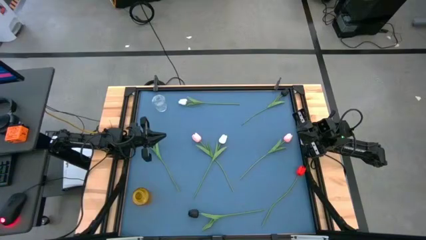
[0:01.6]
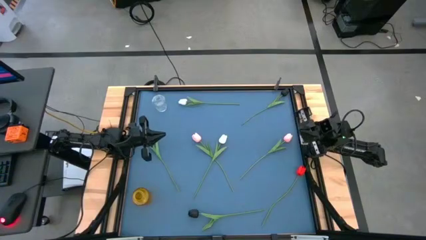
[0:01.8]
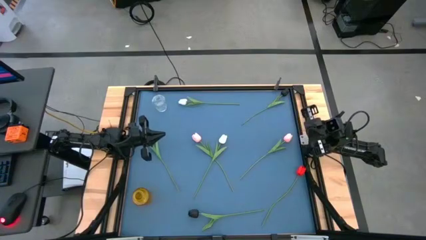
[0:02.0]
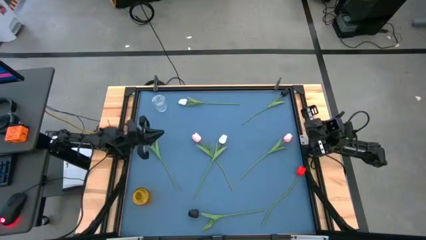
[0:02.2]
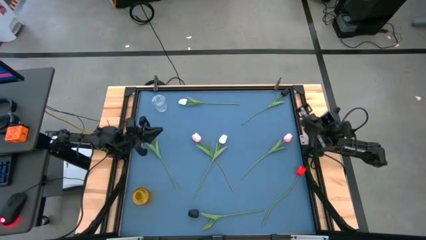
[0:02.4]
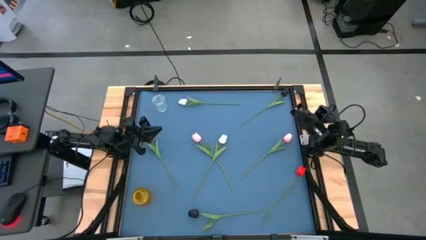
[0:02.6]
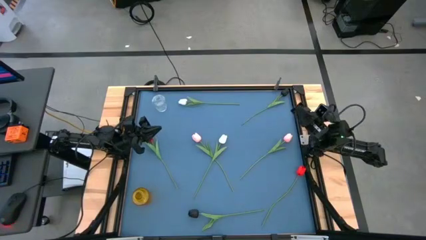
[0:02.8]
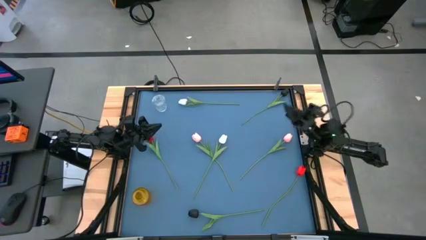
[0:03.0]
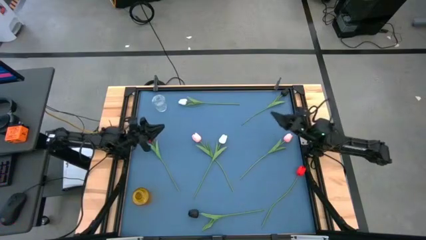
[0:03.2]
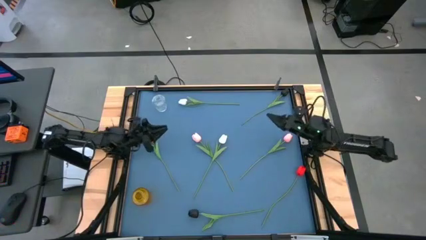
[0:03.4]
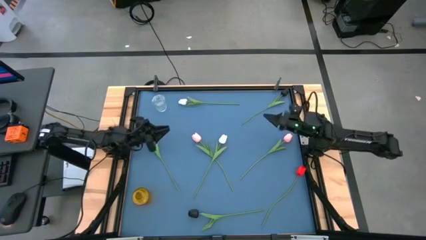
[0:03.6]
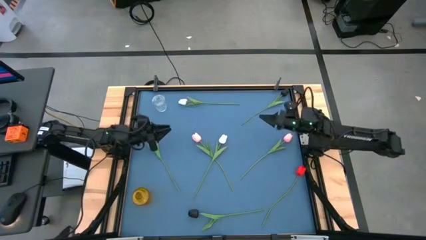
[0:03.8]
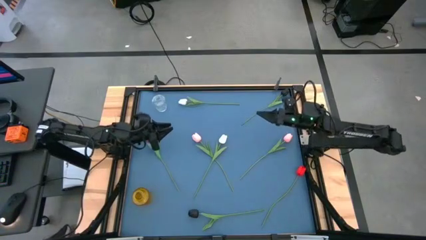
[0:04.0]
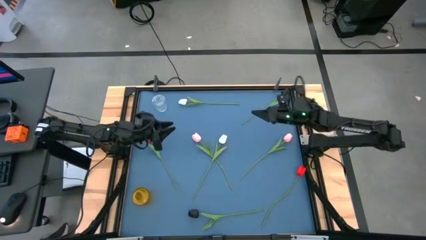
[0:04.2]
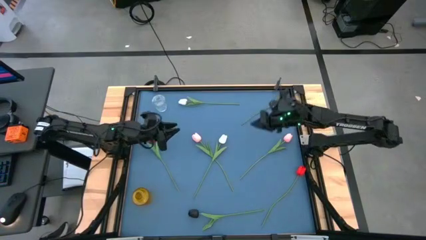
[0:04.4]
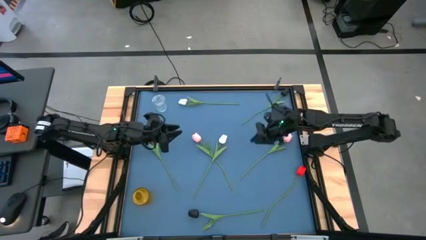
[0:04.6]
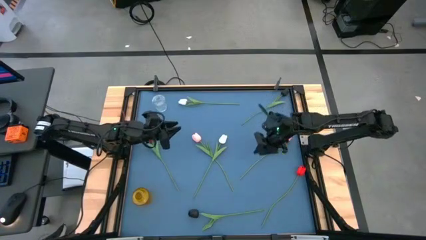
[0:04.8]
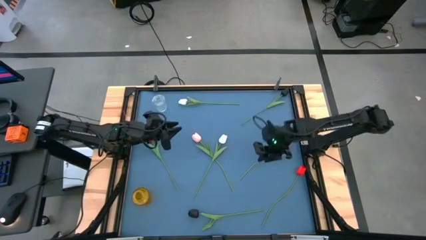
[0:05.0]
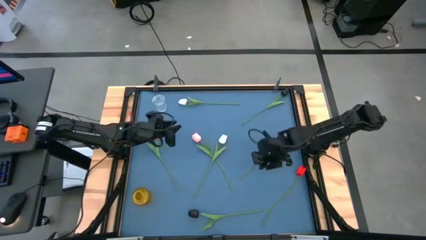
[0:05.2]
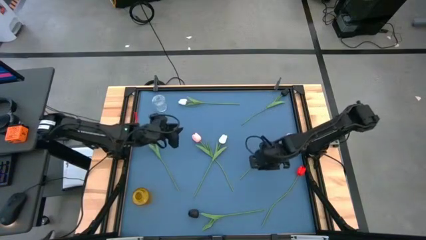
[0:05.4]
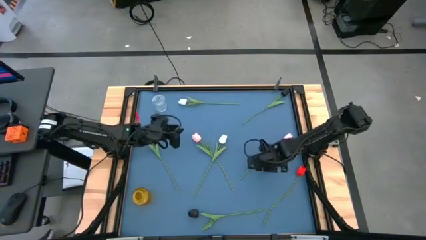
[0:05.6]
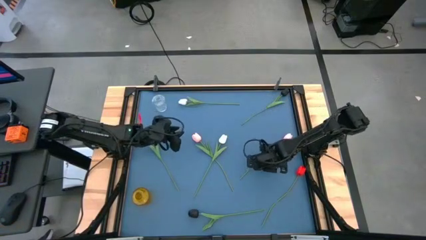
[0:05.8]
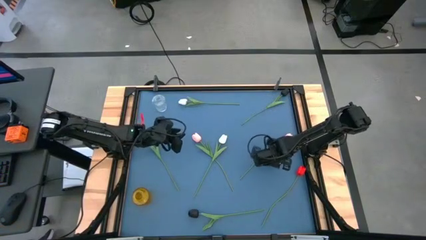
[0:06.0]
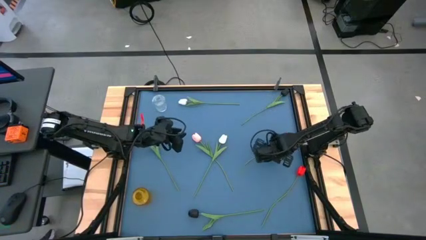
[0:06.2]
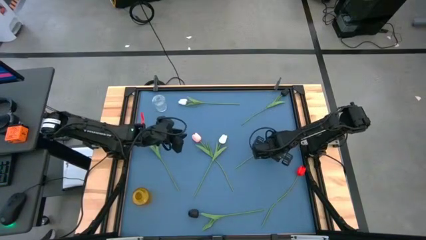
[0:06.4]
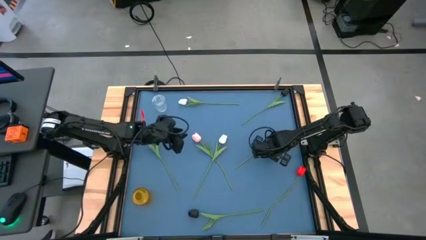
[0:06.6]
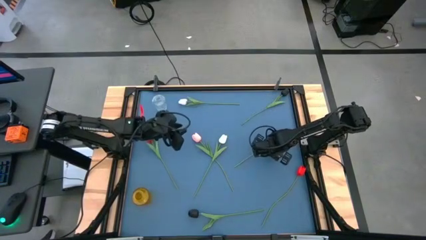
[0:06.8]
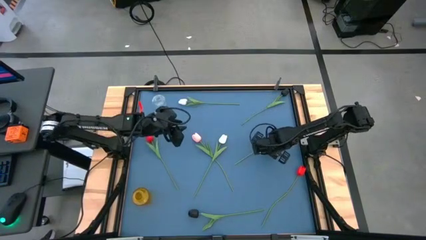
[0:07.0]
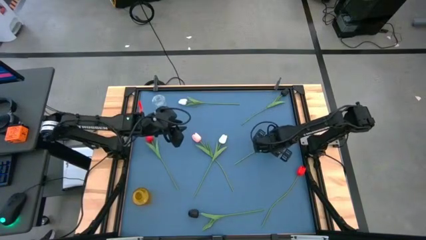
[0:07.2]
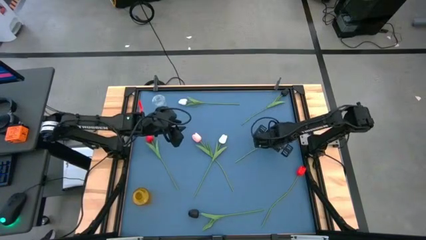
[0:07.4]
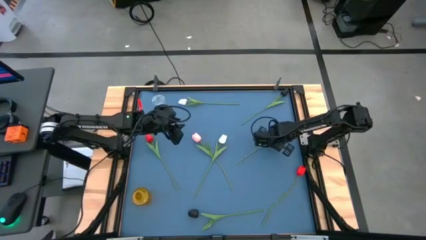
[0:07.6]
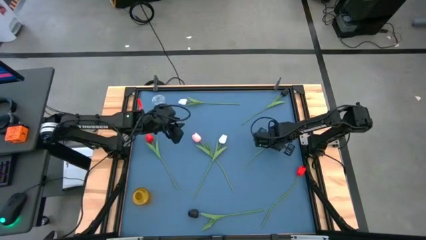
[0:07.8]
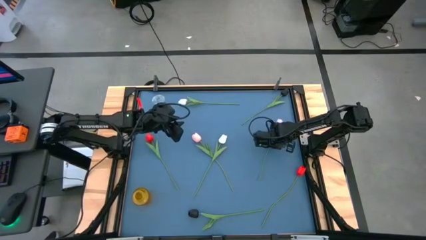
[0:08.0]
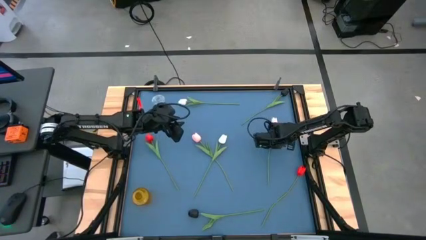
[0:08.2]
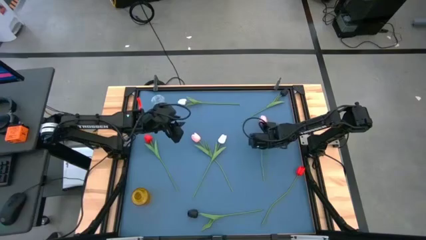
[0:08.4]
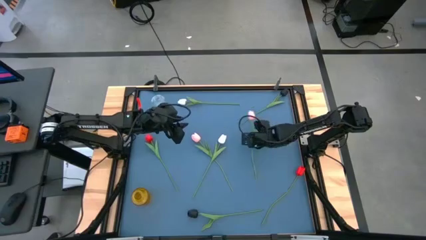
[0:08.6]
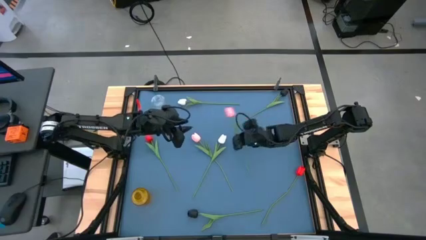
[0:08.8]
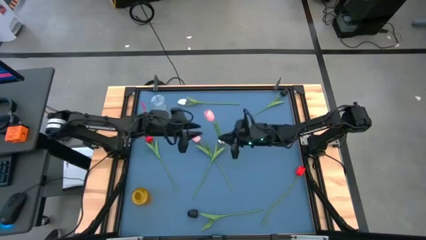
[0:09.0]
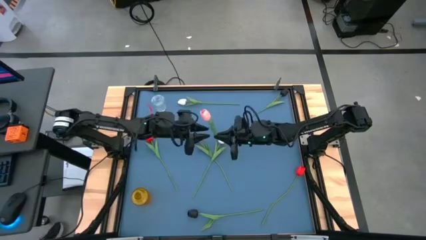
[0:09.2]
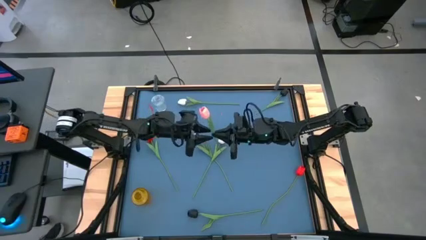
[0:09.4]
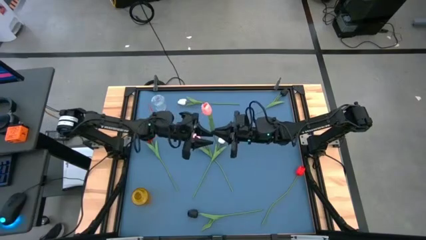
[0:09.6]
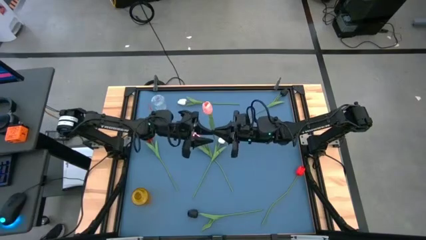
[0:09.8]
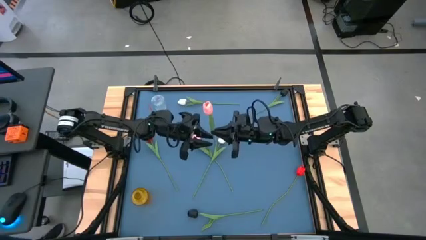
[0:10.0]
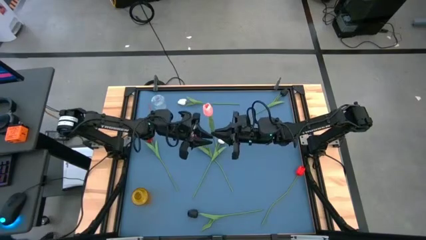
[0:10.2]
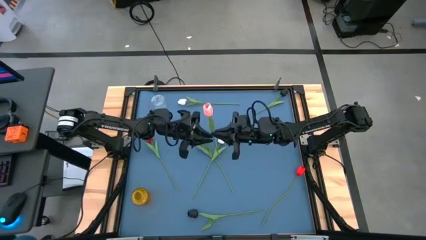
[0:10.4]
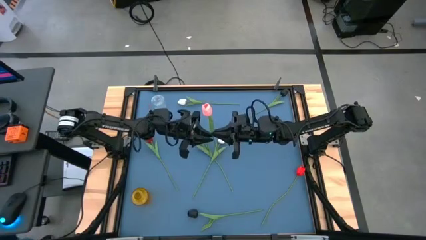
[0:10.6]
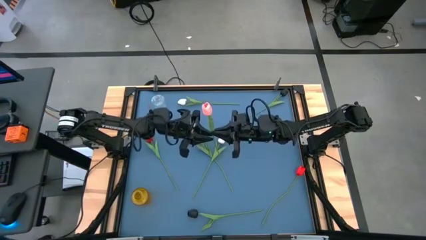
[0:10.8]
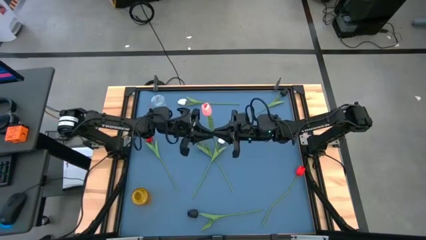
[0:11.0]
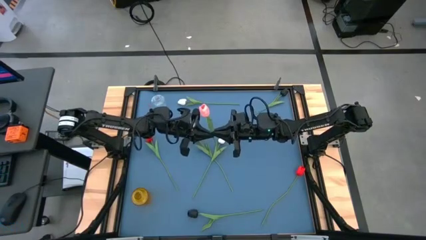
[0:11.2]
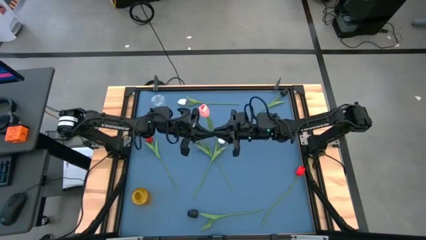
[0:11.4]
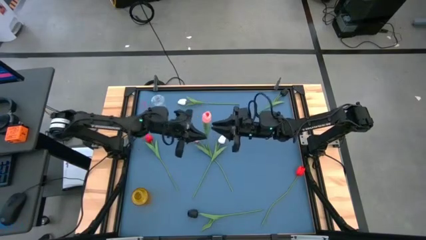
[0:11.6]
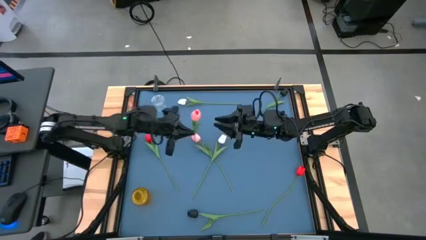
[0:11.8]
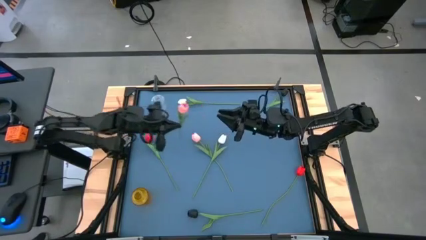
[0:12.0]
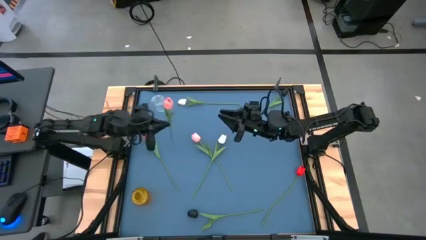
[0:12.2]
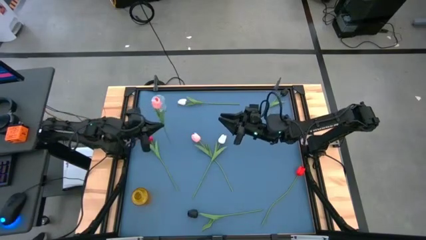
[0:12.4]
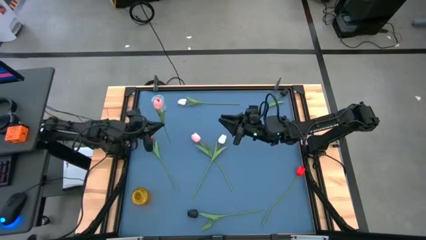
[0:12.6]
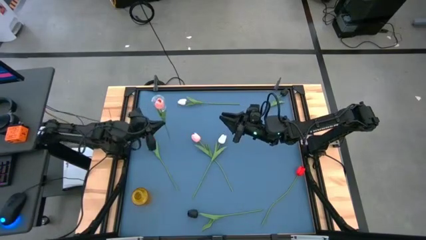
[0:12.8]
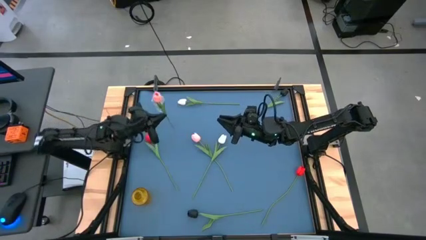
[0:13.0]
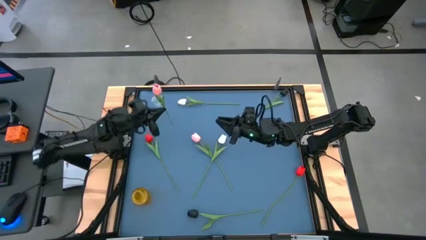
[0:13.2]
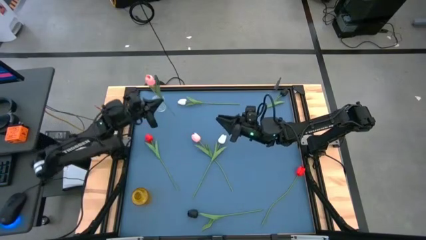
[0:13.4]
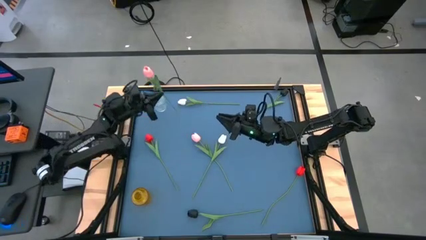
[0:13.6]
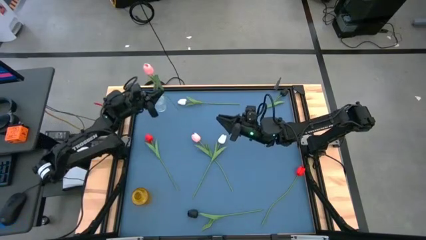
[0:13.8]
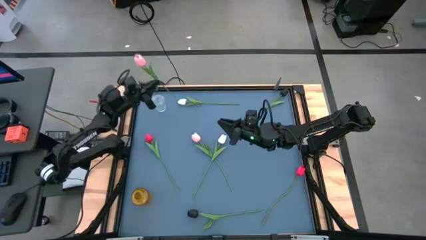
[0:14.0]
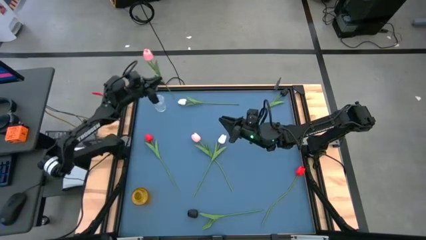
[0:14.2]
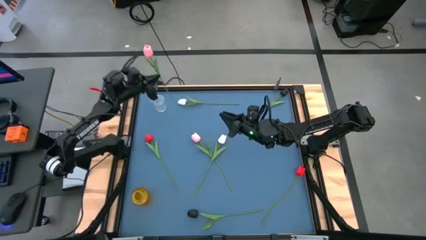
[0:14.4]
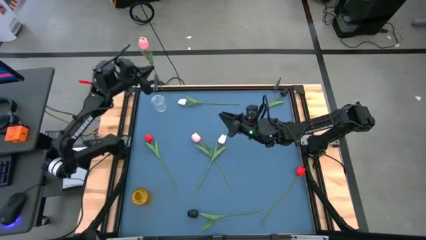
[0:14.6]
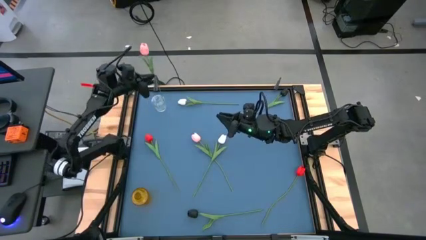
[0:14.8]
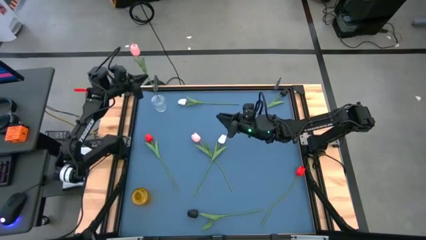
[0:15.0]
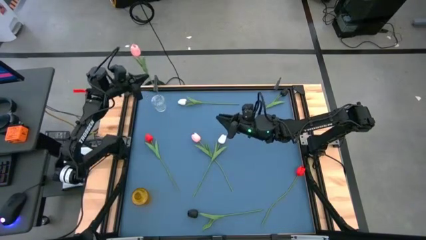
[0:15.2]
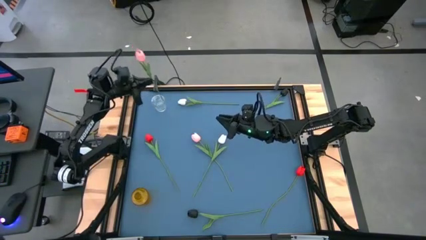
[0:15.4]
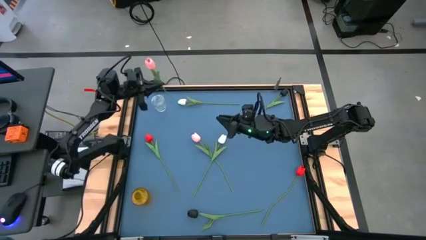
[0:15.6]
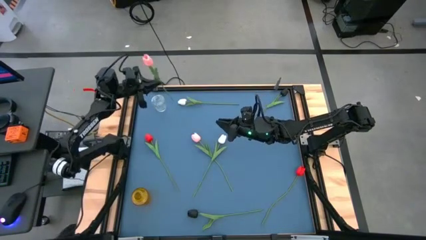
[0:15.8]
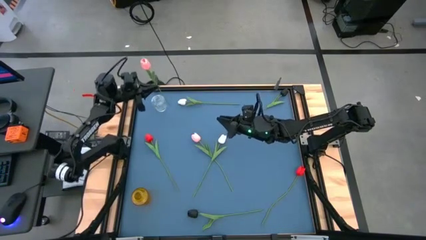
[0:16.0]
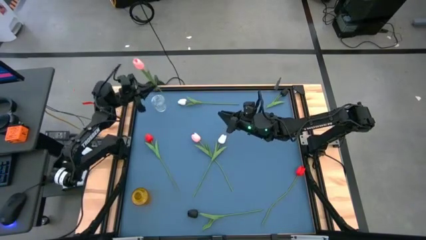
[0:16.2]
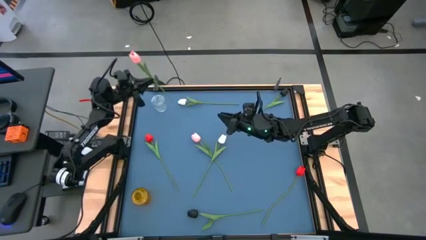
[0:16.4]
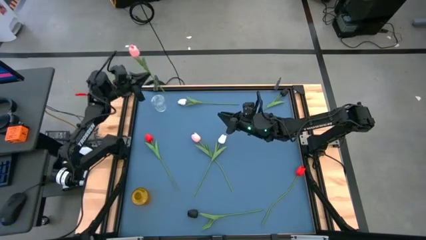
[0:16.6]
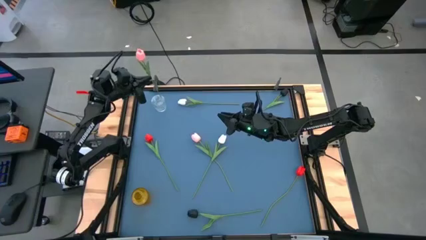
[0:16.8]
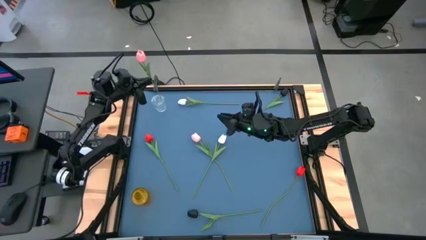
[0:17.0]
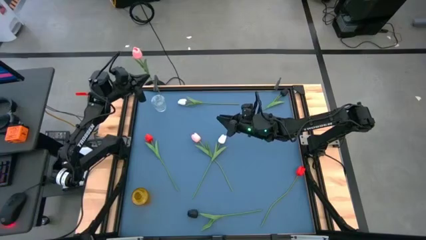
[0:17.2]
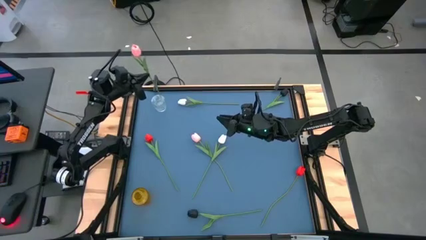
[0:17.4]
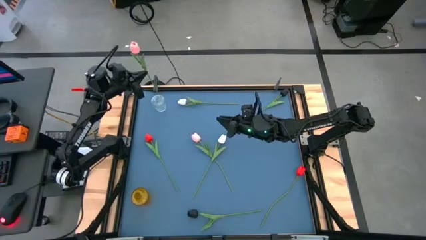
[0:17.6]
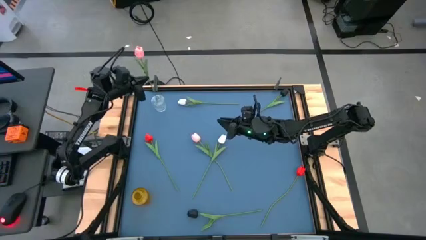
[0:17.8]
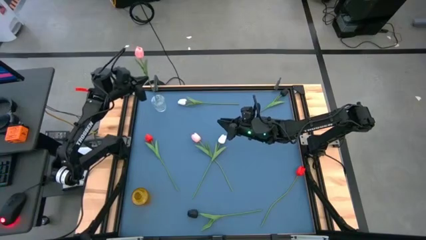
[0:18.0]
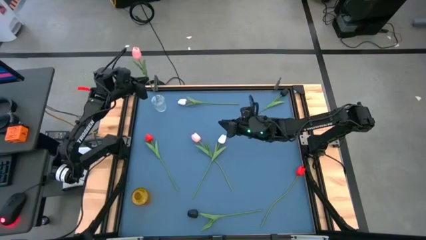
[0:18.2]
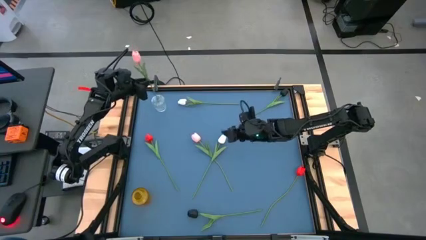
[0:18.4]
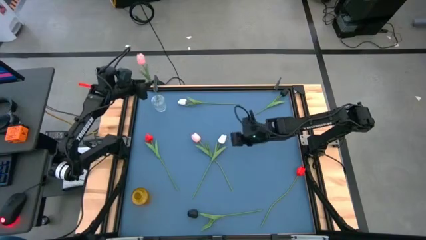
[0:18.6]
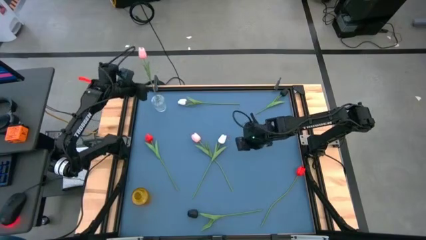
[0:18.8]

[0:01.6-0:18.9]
Task: Sort flowers into vase by color
Put the right pink tulip into the transparent vase
